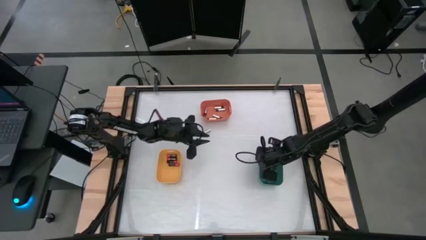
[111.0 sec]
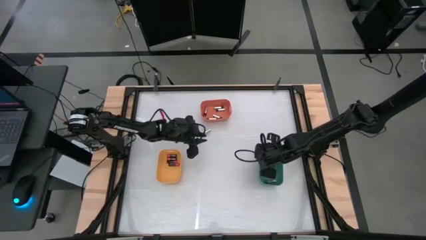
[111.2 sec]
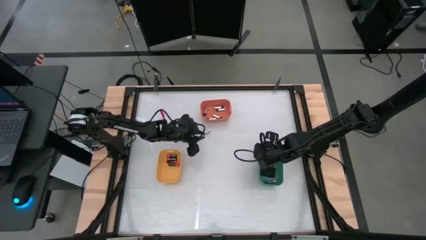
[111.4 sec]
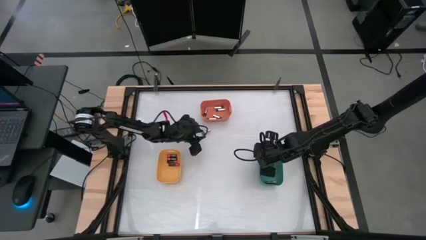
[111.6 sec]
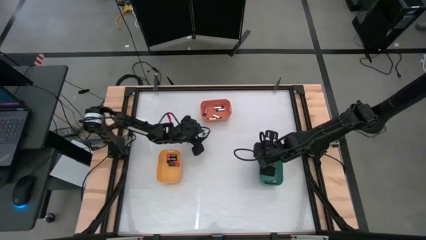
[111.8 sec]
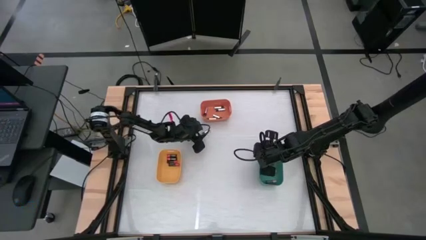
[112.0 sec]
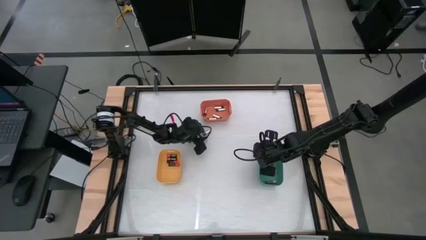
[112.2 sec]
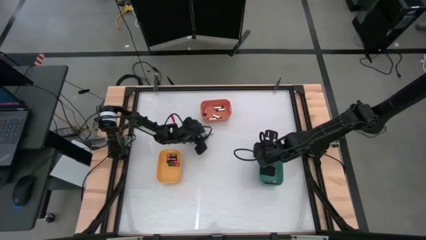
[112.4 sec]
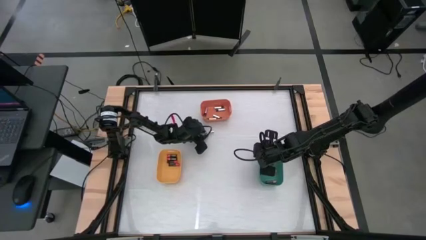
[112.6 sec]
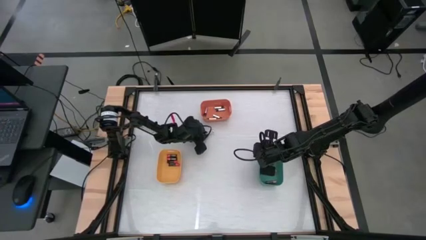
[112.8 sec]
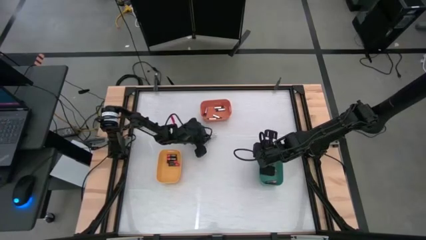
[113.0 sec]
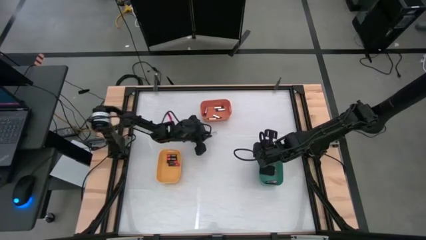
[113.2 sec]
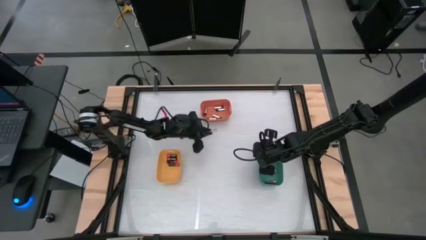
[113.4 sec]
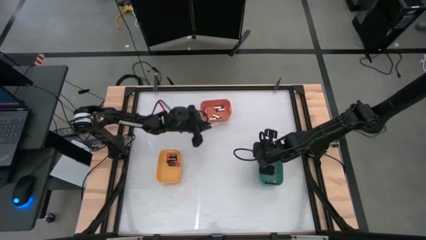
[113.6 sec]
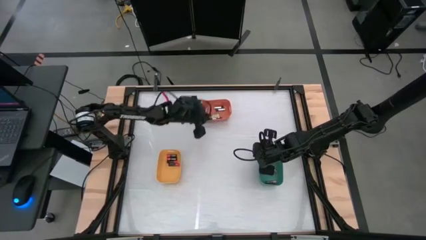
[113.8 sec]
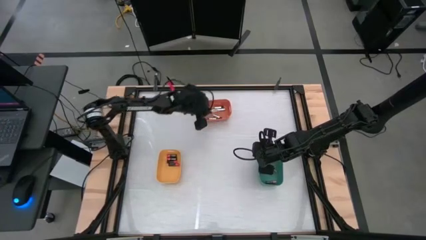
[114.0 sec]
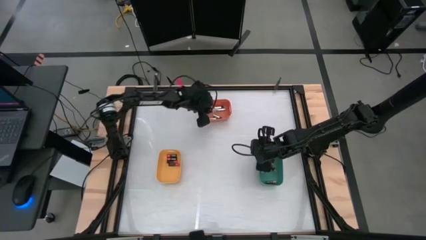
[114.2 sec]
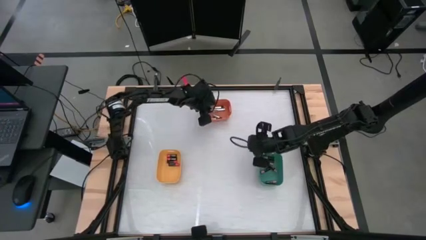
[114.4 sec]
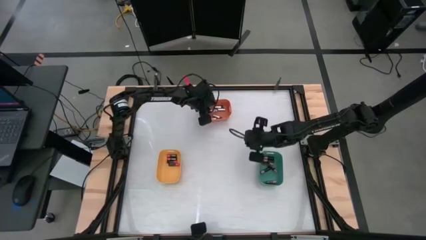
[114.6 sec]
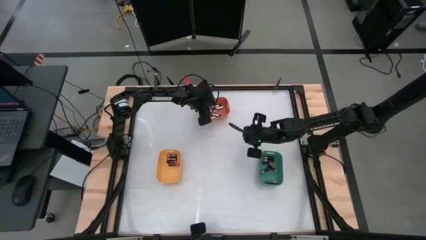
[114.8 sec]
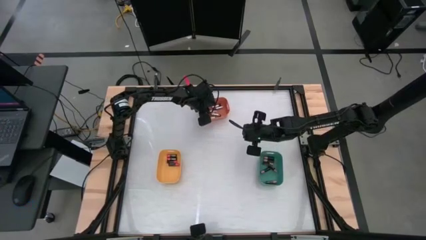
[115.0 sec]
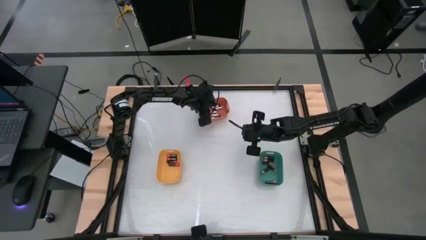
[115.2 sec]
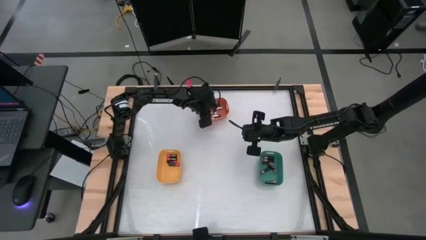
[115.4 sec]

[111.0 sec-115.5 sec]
Task: Sort batteries
Put the silver battery into the orange bin

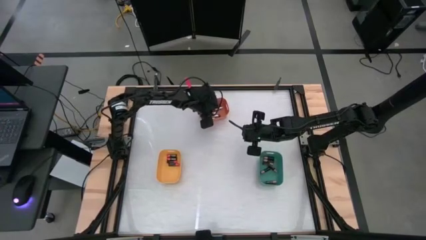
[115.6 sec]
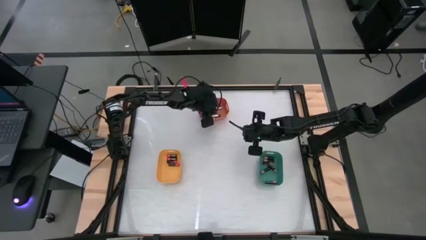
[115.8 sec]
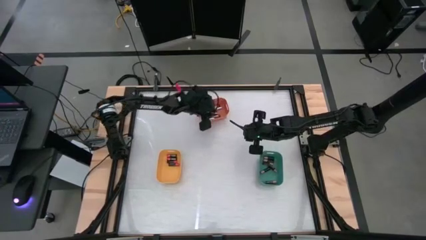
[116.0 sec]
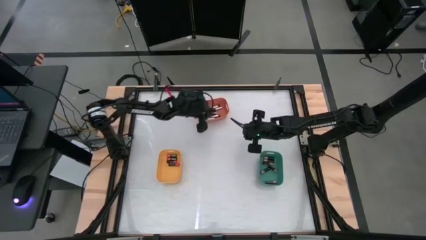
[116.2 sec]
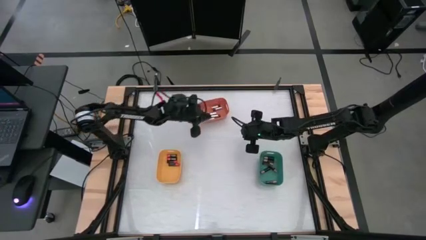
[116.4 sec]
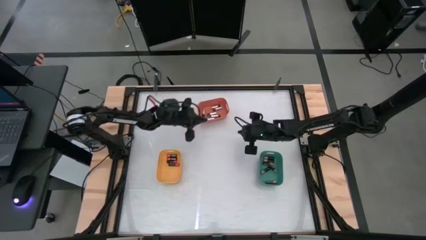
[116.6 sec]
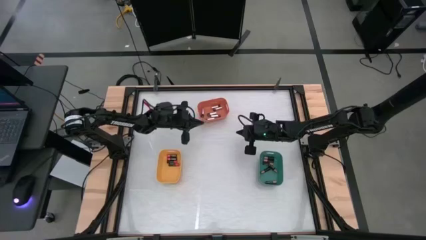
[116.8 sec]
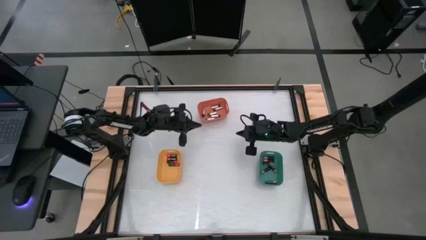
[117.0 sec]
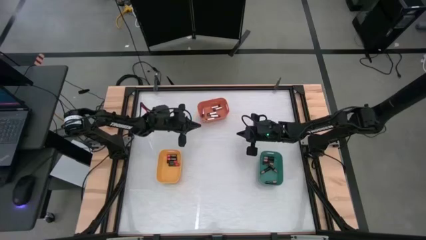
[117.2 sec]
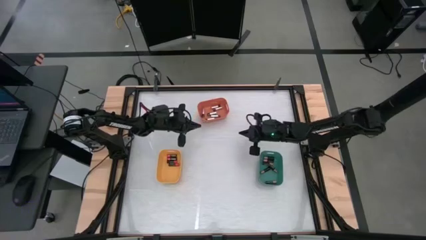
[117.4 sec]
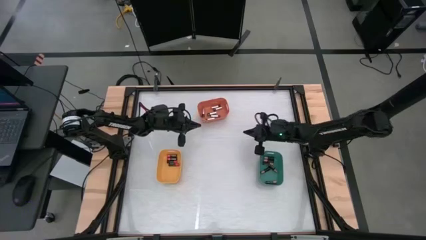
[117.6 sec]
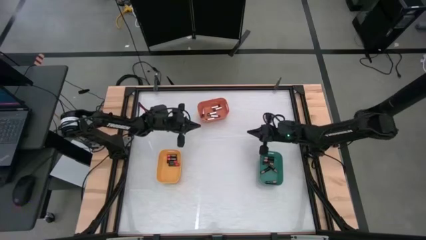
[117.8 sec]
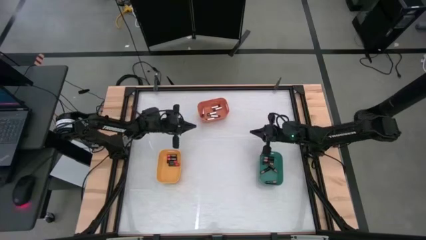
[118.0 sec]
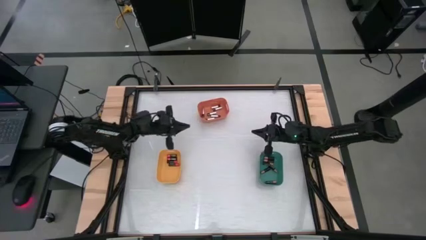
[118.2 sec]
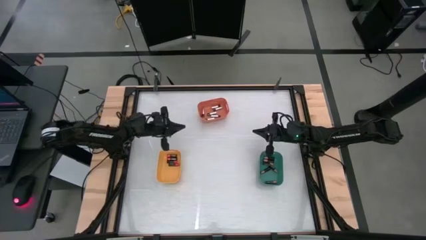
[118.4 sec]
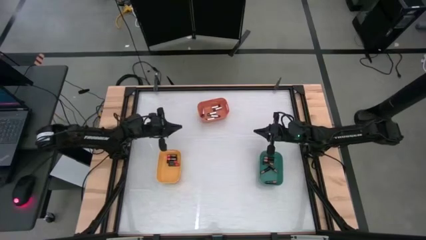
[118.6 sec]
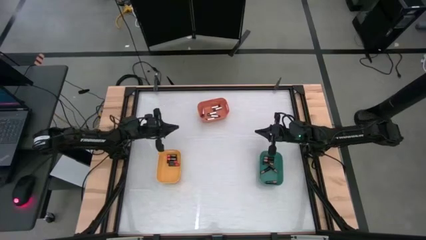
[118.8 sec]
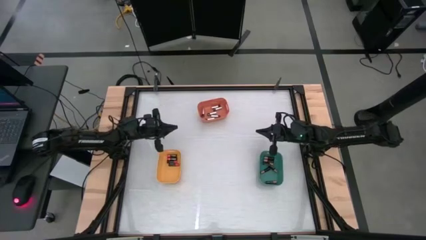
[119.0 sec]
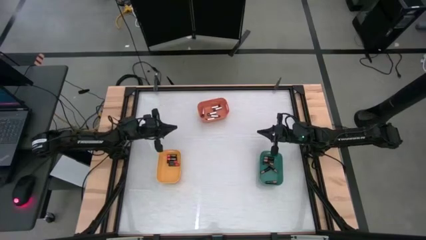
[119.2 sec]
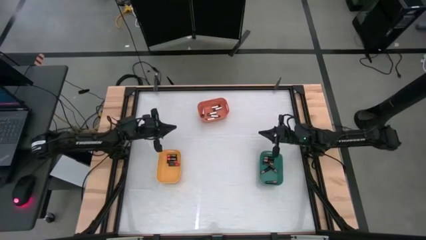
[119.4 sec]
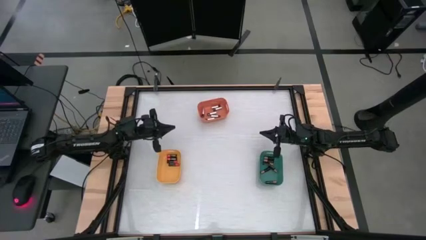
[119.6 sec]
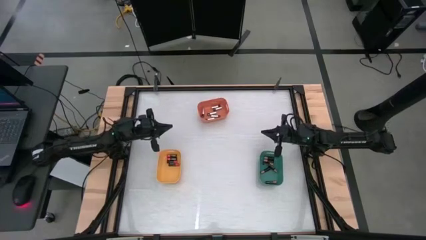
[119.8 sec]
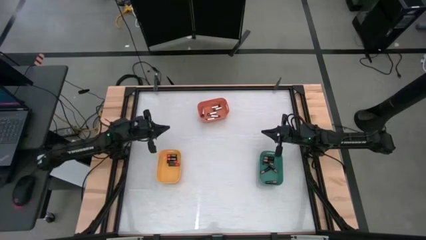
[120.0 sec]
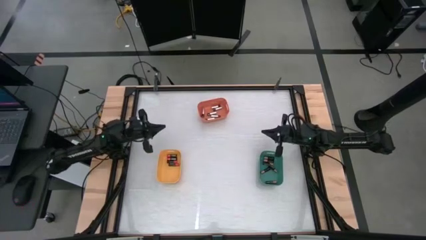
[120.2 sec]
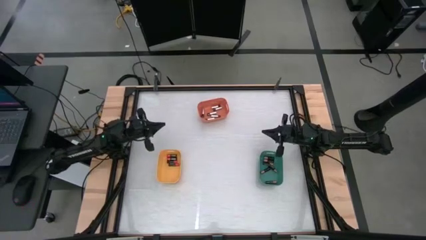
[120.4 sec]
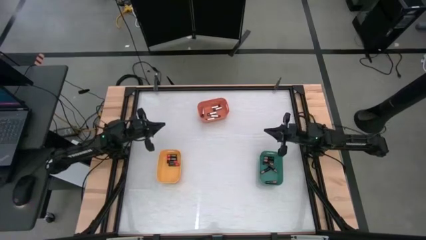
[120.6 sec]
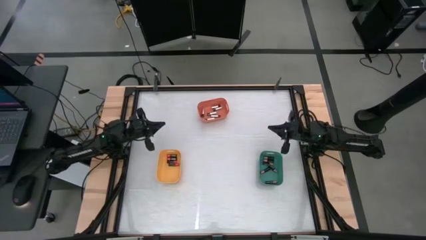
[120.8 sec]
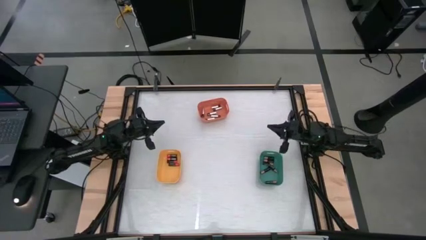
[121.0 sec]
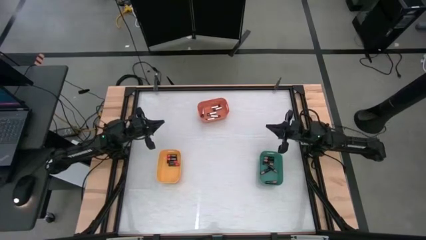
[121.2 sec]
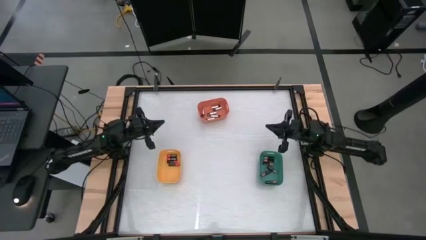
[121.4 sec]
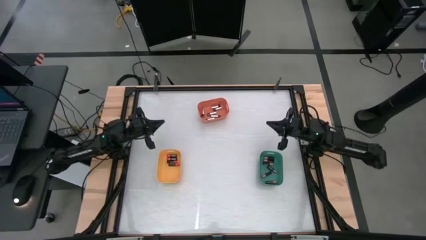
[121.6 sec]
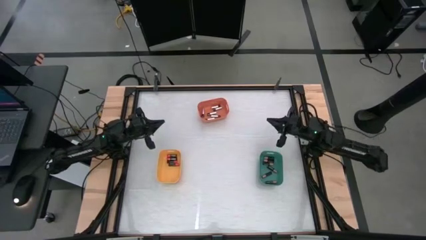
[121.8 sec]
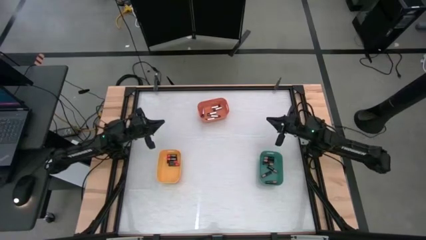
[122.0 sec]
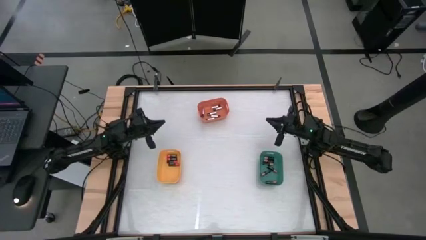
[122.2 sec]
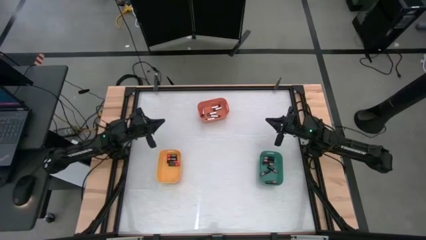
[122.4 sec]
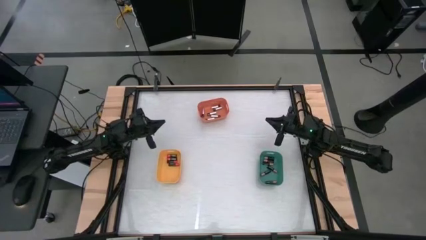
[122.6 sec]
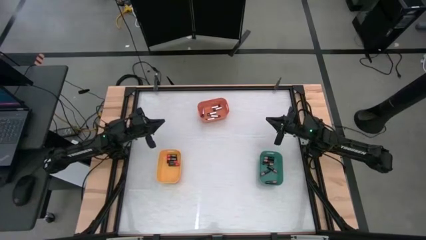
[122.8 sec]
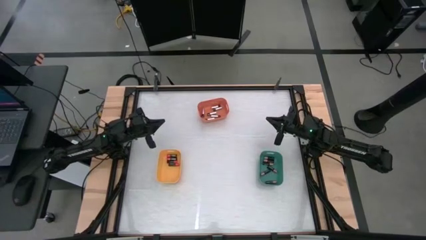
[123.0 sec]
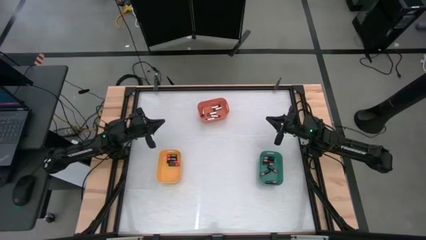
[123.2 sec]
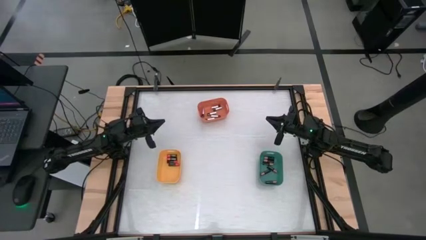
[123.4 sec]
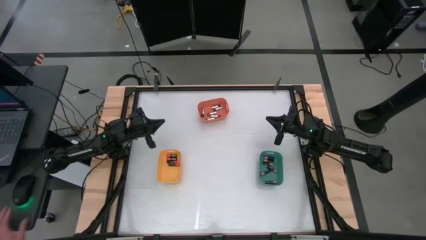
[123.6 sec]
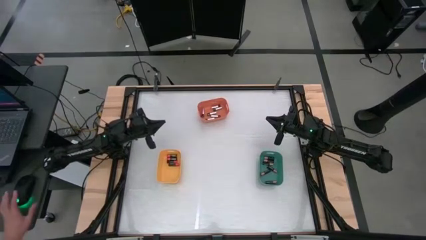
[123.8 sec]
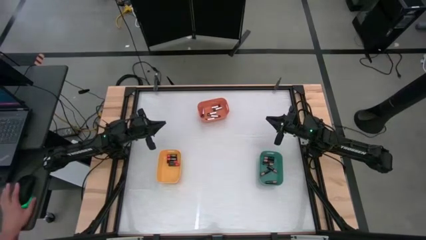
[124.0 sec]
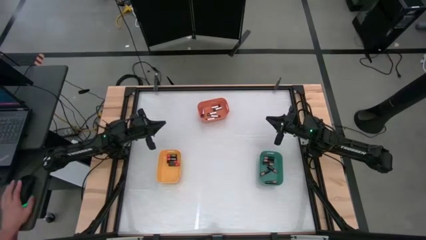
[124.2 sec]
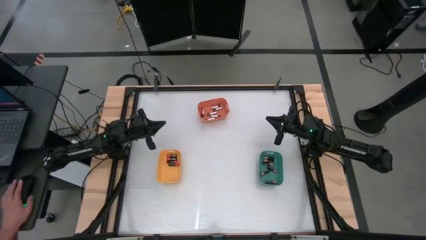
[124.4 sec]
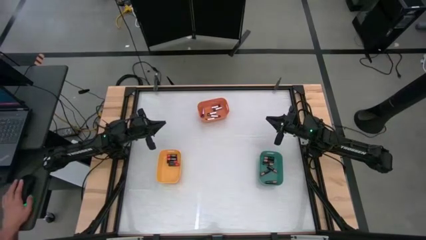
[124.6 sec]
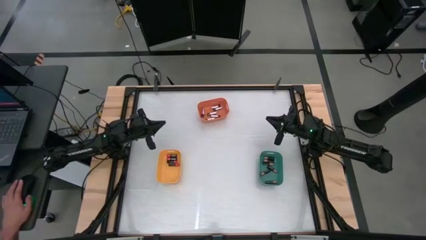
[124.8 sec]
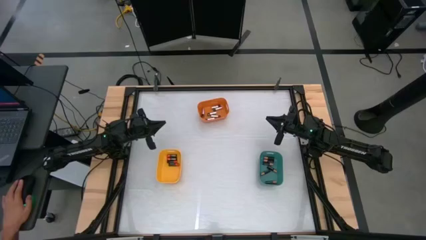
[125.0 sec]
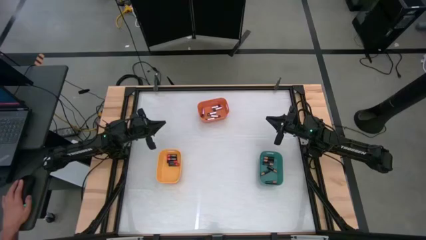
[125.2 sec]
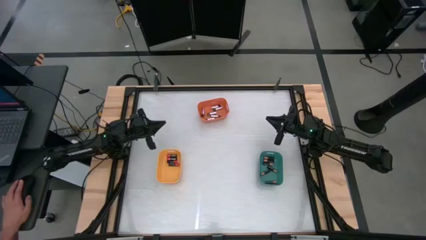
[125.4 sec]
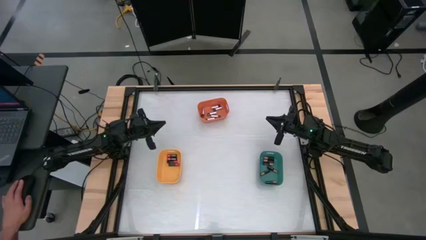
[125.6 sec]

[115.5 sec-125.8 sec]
Return to Home Position
